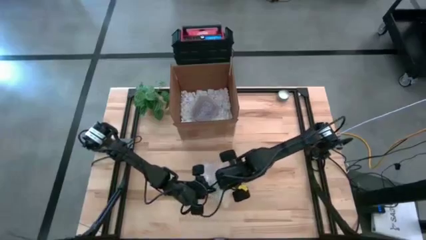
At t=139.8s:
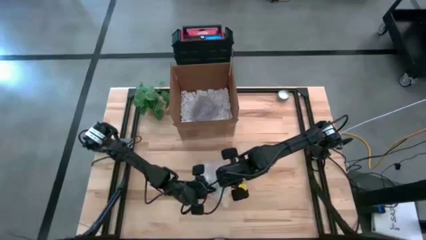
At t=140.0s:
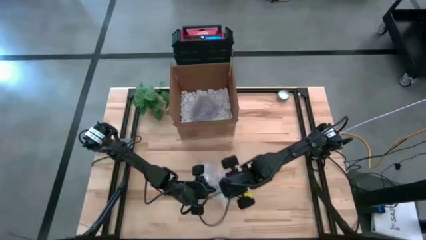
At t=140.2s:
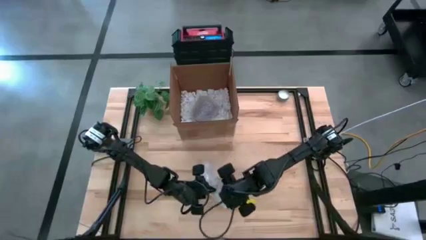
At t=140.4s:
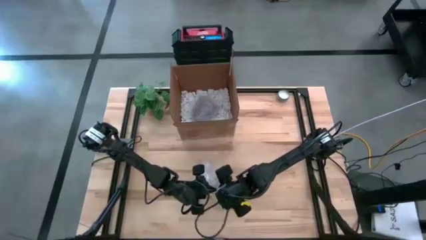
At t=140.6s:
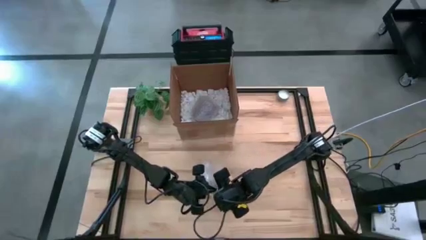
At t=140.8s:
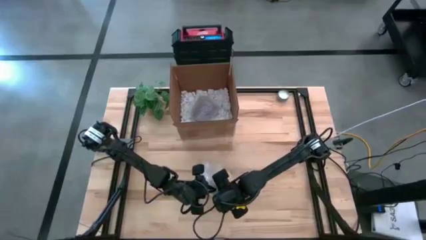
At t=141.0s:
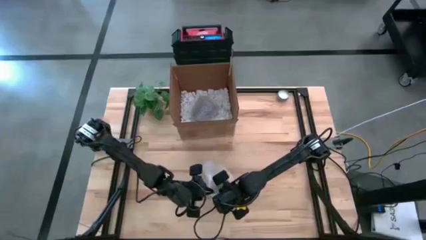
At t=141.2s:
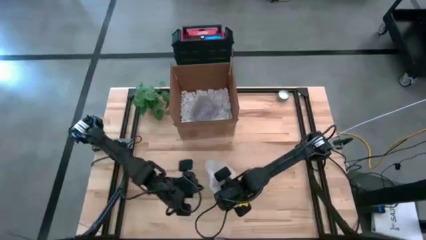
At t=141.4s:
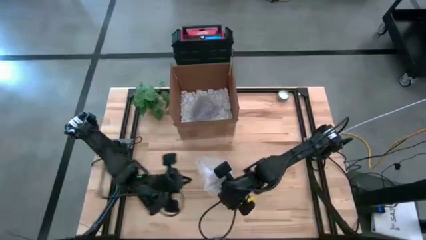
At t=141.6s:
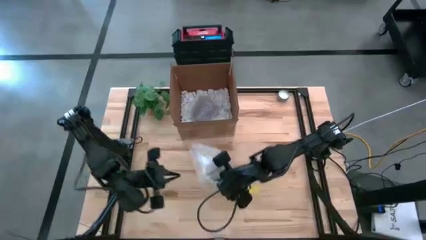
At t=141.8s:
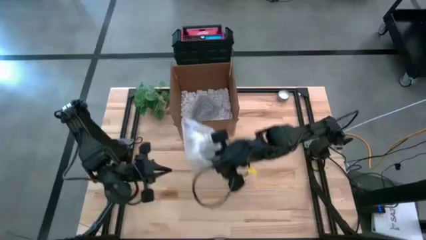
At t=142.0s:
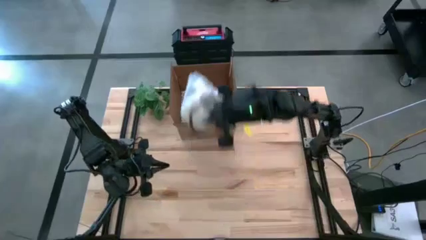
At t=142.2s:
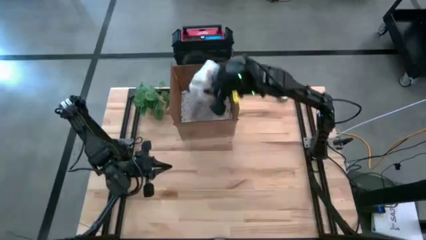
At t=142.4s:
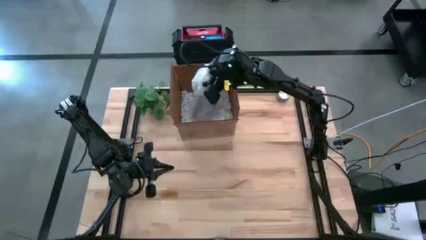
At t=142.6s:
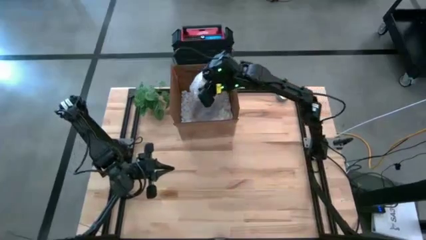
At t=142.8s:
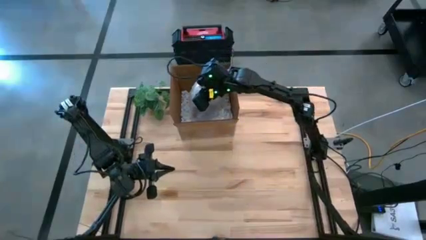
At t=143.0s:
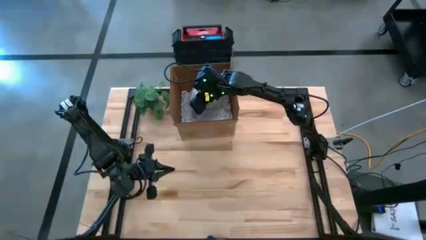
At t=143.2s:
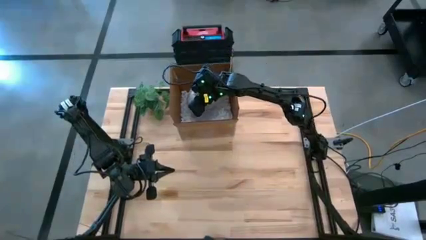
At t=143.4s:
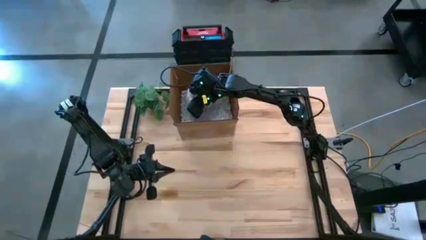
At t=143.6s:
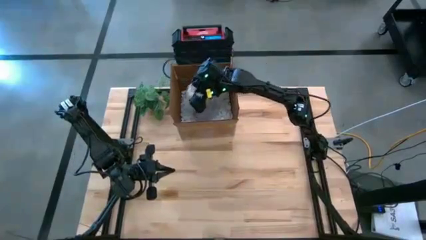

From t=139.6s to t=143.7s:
Task: wrap mug
Put the wrapped yellow mug into the cardboard box

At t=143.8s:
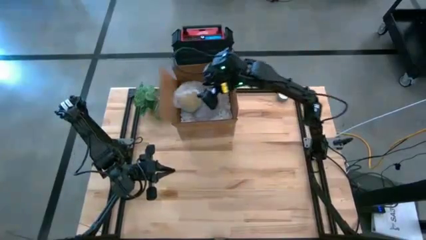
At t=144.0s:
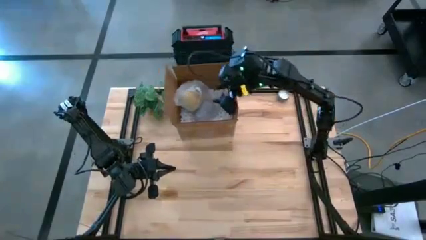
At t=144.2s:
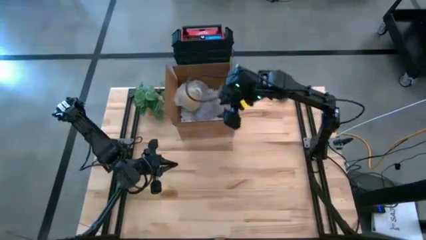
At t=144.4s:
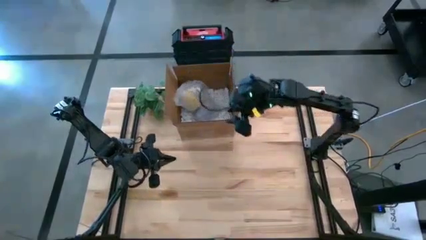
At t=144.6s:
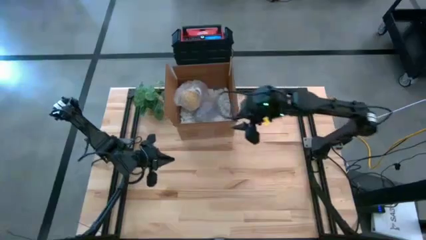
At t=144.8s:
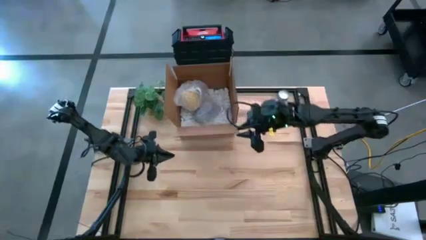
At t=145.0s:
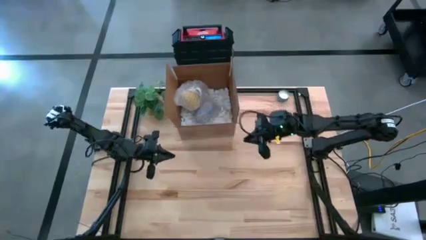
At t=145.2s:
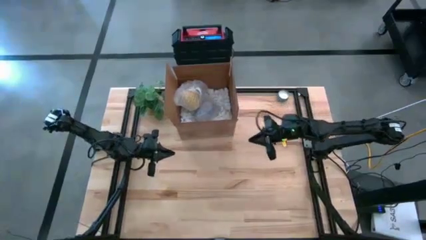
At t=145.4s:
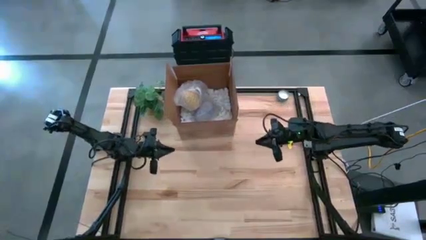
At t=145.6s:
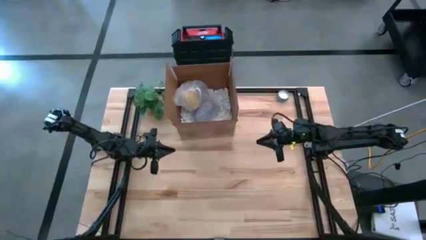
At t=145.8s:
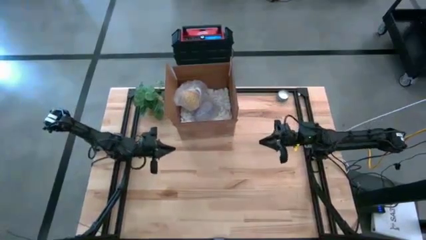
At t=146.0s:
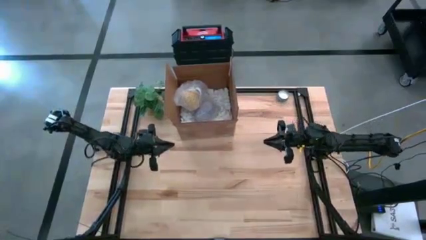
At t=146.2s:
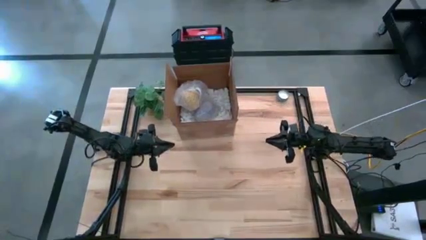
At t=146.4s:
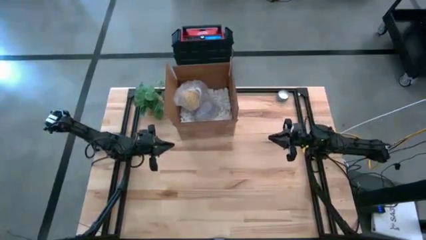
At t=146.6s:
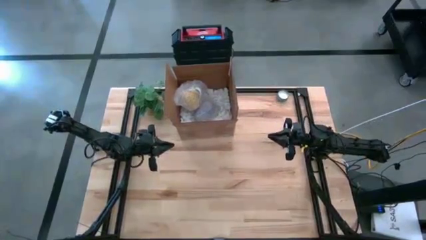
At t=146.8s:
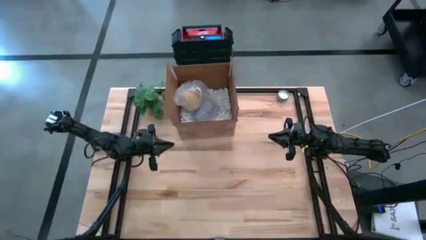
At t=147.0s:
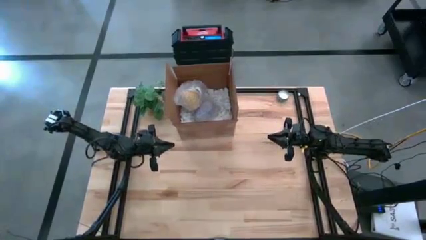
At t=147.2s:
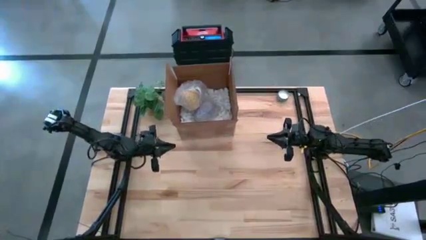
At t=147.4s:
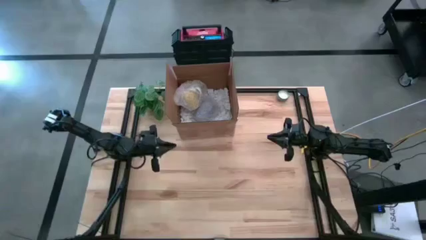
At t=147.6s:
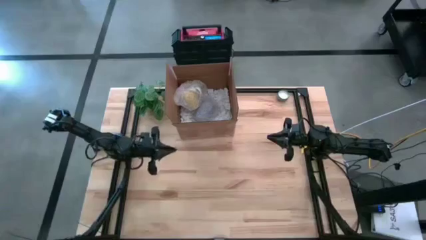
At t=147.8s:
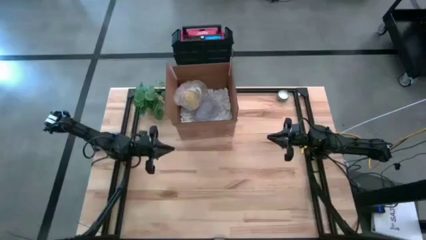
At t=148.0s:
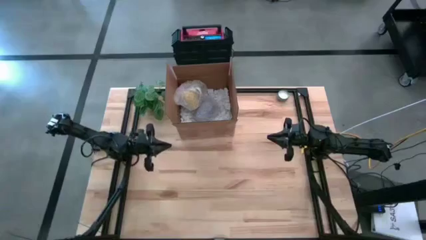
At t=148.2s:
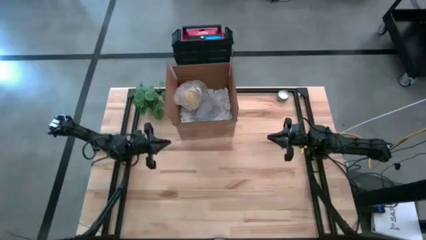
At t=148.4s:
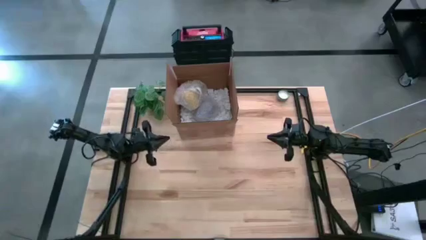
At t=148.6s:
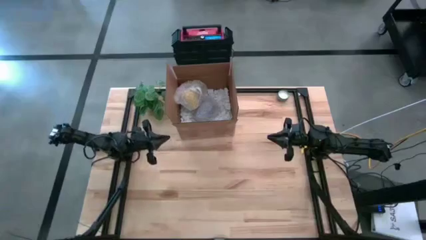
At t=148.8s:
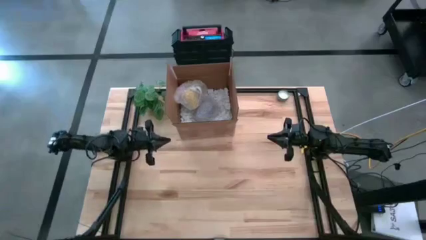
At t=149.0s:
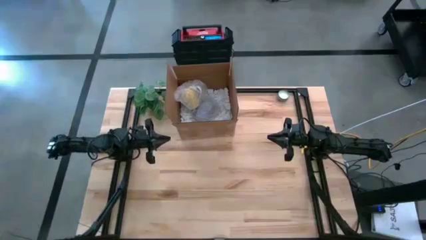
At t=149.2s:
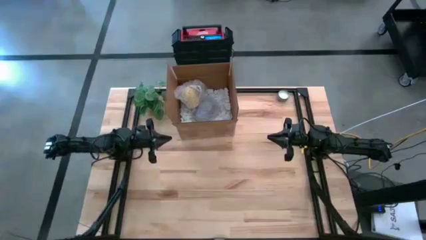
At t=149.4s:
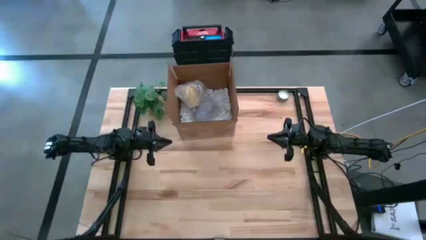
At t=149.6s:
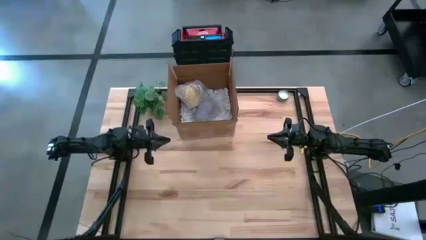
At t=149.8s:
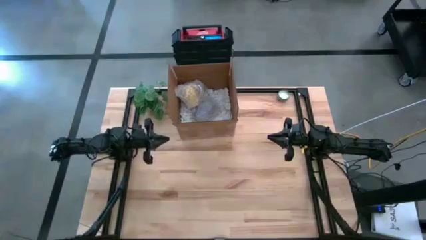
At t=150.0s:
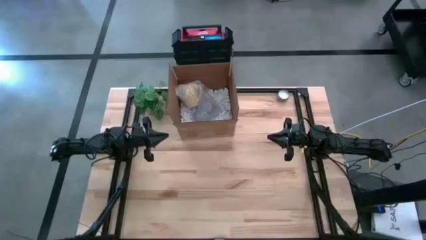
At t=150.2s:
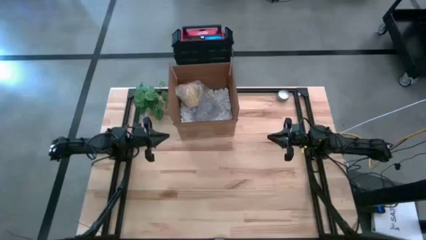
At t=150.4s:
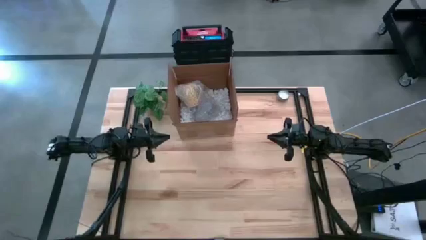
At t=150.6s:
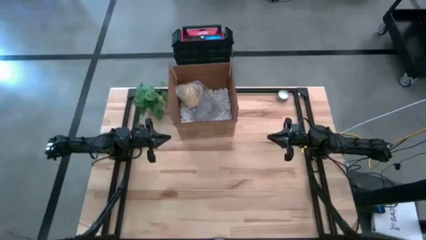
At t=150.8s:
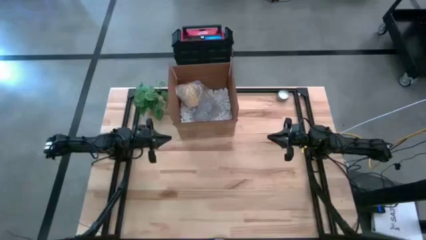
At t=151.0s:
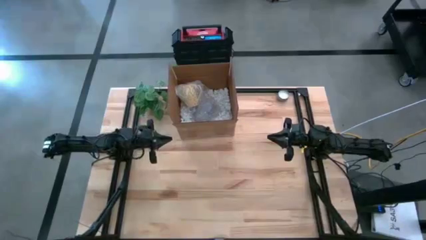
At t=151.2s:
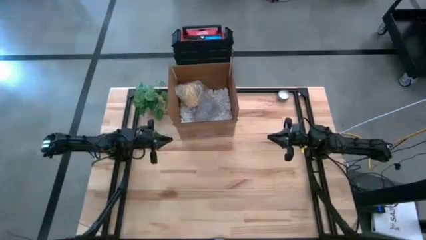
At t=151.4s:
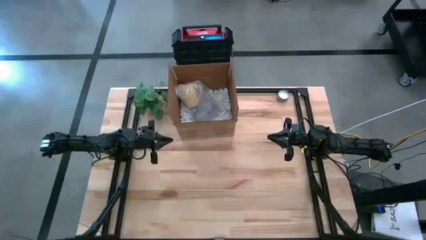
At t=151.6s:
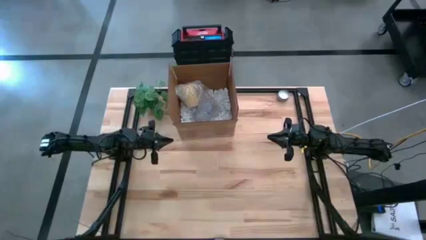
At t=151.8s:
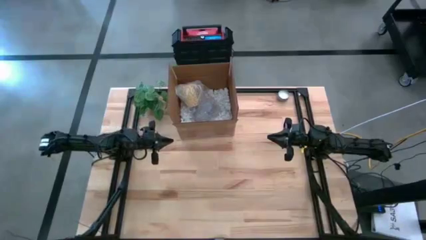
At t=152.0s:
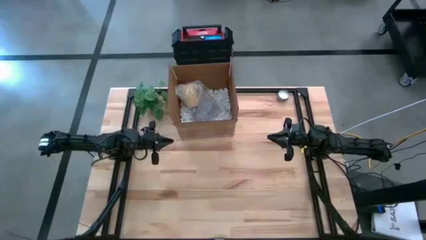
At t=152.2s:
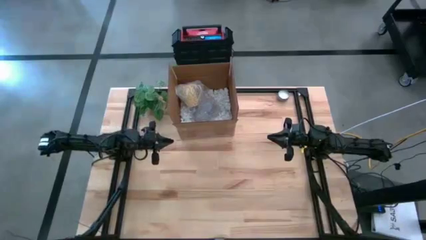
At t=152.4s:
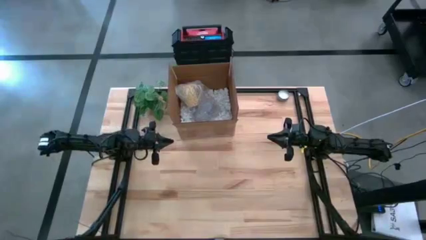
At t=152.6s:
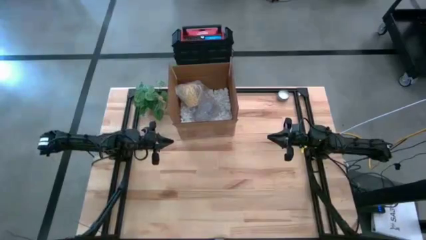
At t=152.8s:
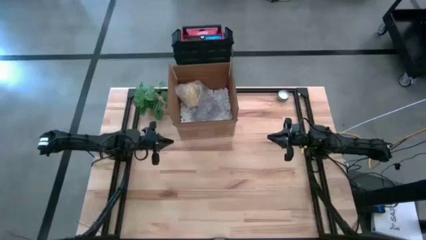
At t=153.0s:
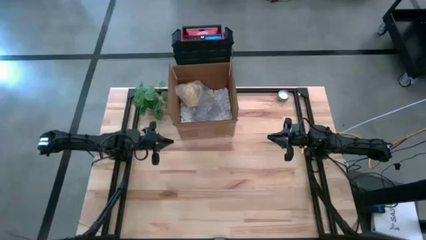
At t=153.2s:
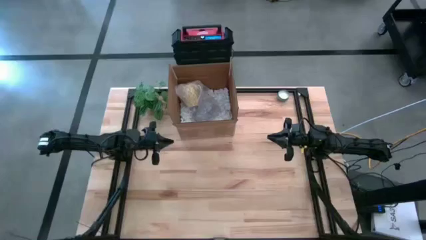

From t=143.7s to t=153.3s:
Return to Home Position
